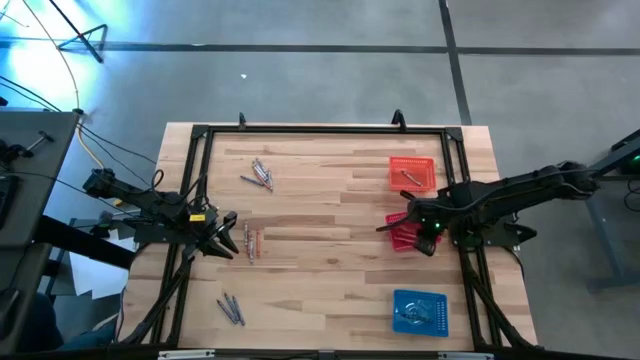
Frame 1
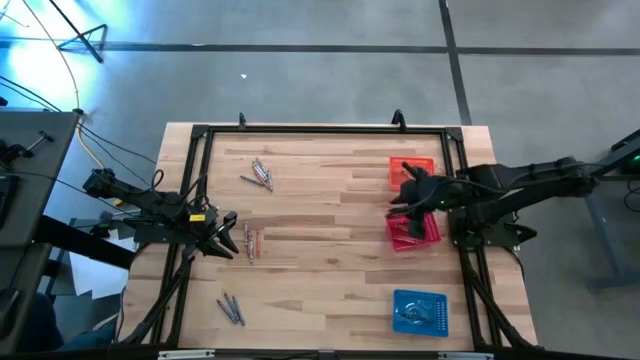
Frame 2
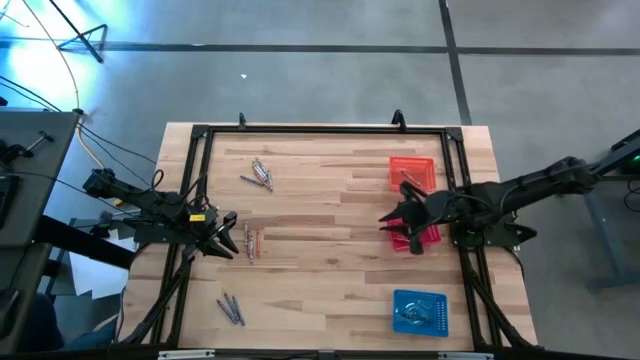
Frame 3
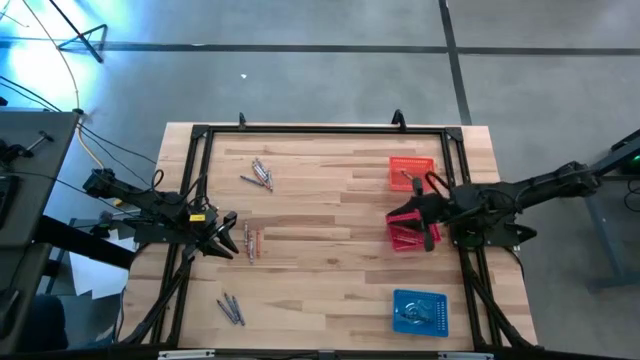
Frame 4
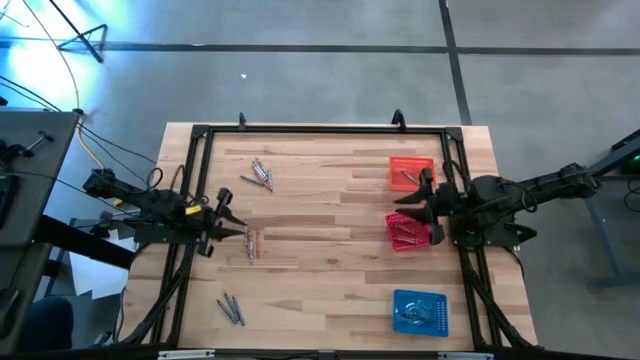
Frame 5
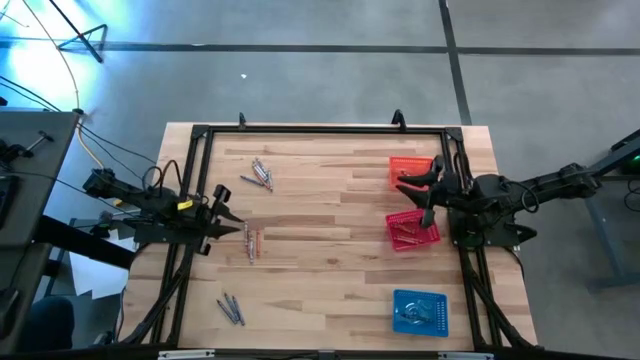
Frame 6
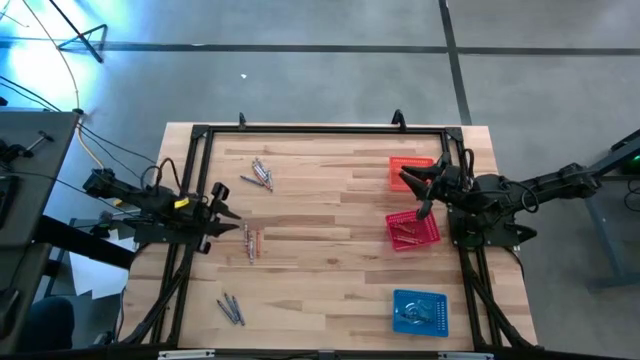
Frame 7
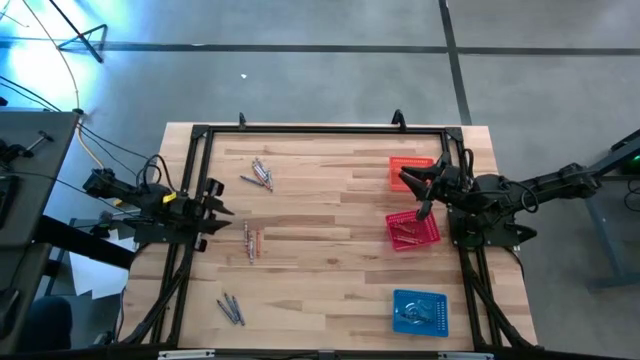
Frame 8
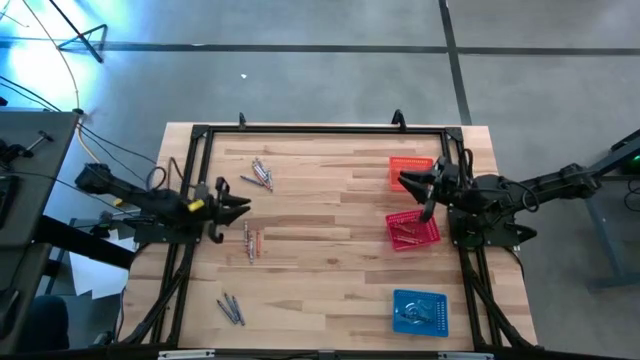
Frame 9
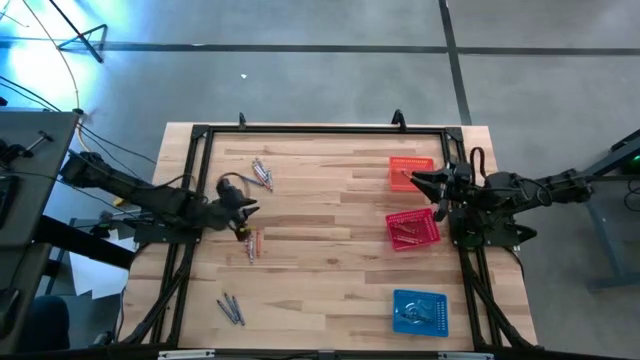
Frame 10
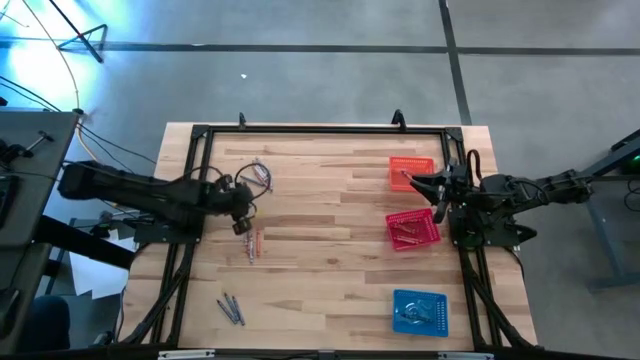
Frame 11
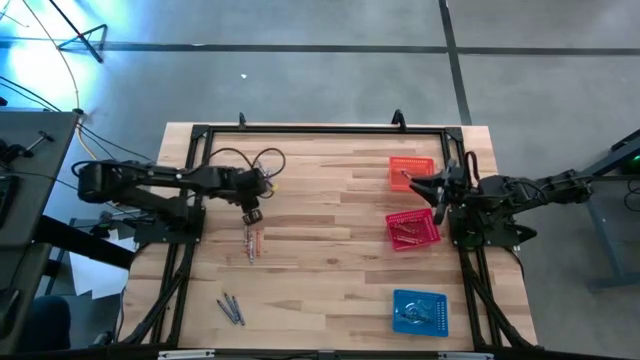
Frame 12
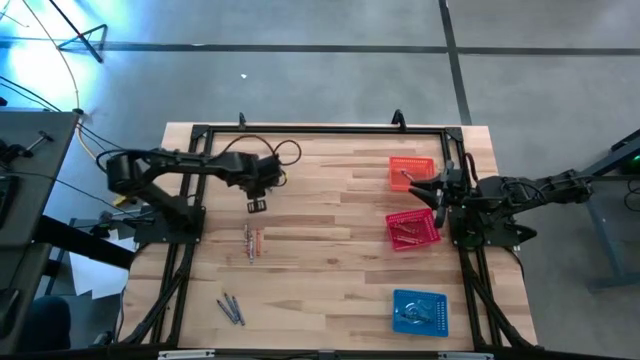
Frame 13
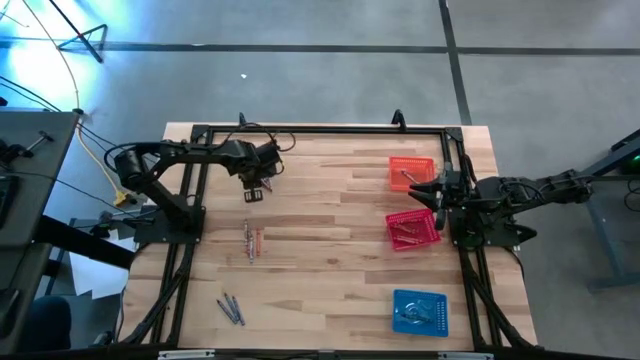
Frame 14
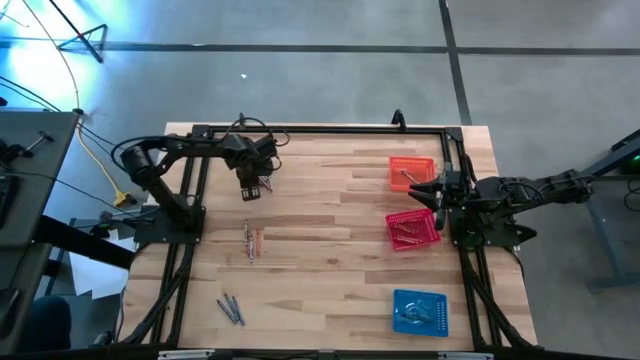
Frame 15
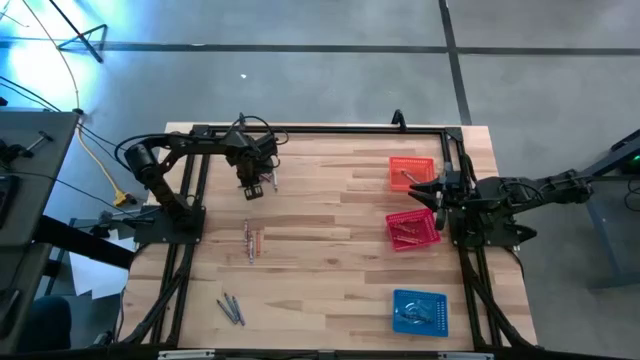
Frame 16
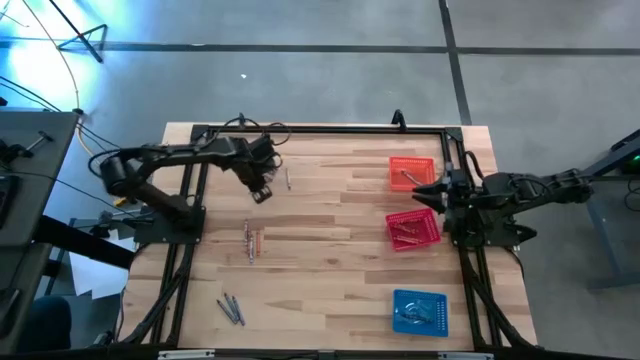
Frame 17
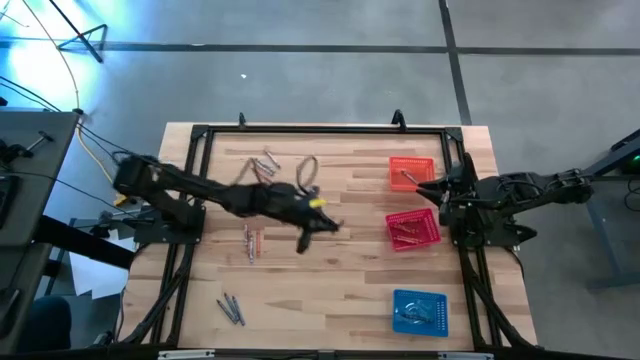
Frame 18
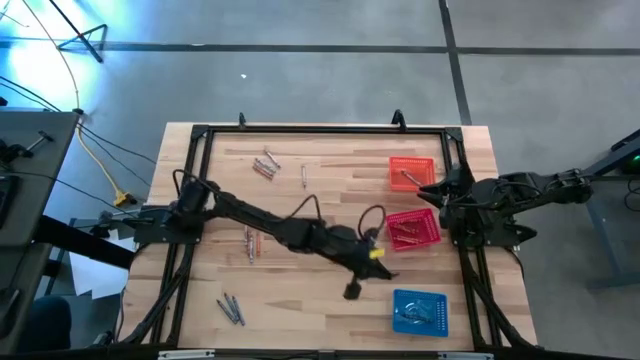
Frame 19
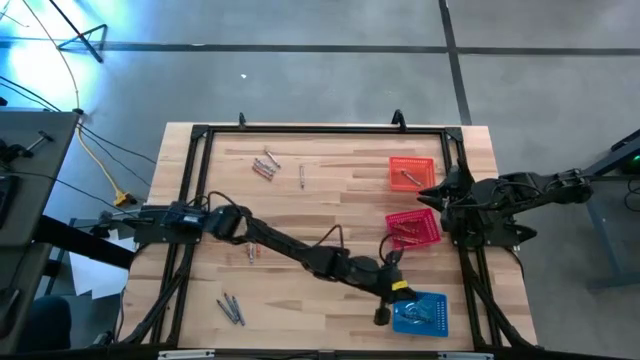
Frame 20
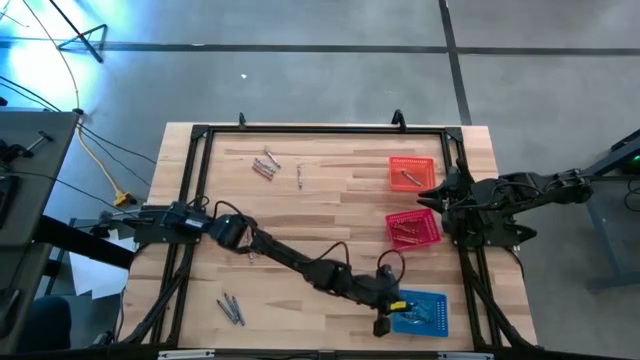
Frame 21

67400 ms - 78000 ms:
Task: Sort crayons
Put the blue crayon into the blue bin

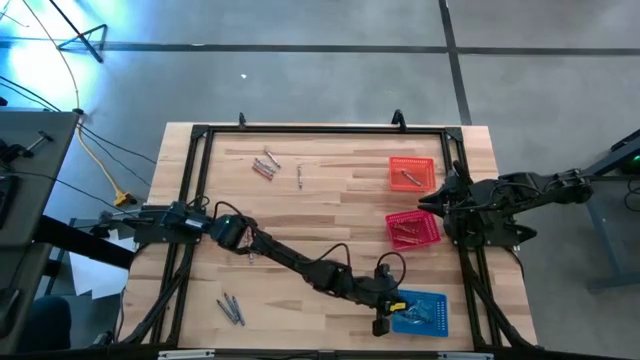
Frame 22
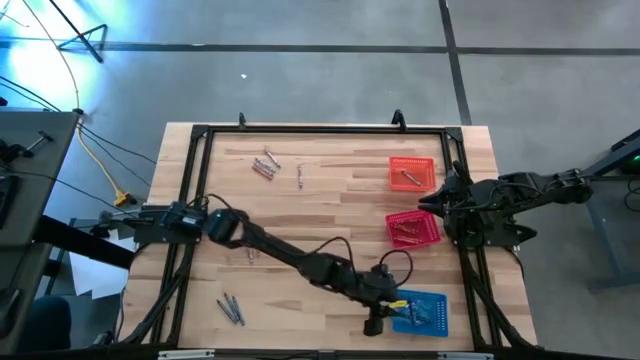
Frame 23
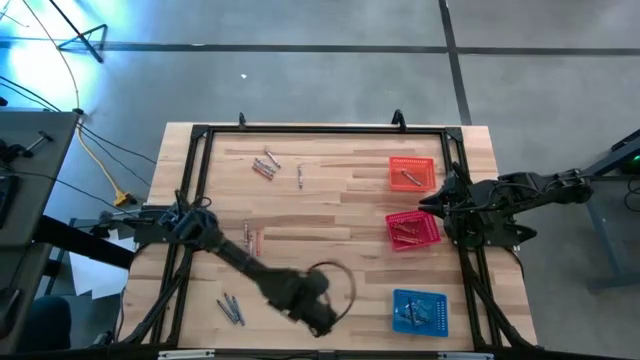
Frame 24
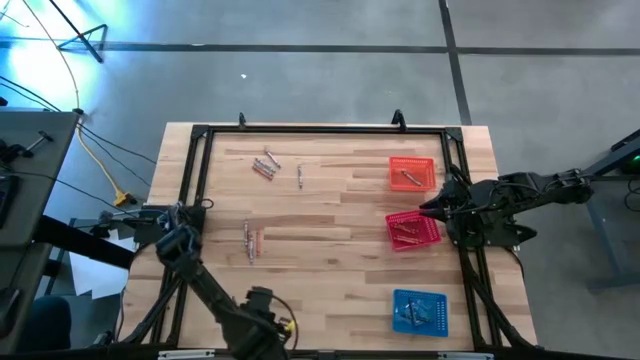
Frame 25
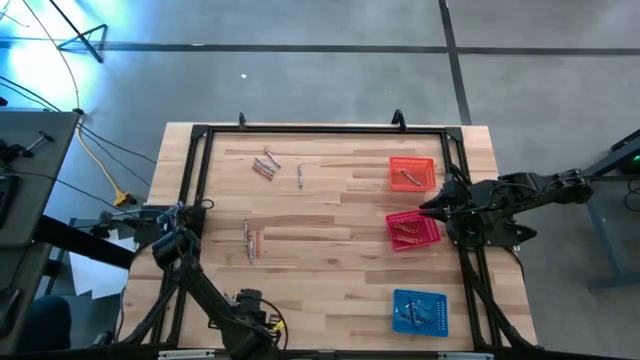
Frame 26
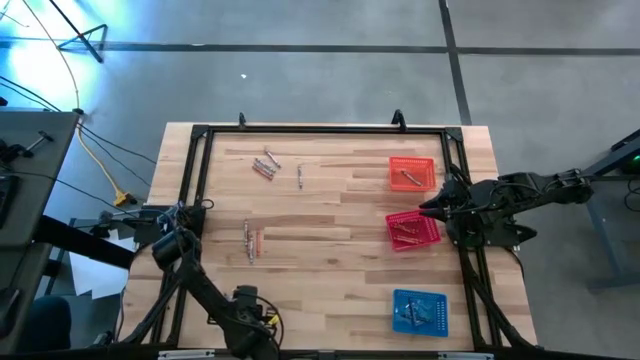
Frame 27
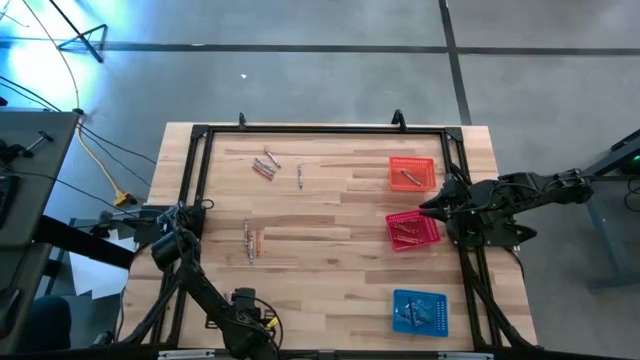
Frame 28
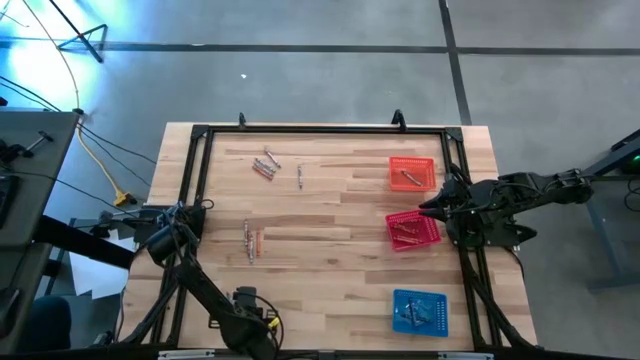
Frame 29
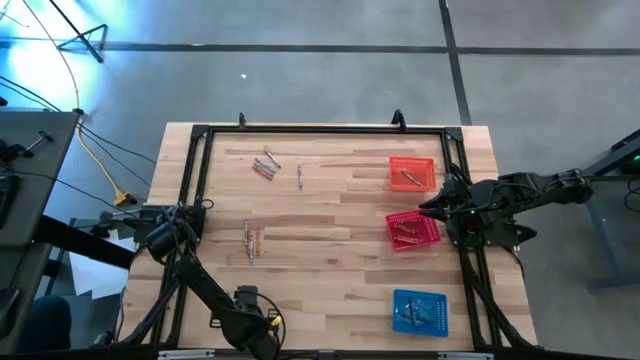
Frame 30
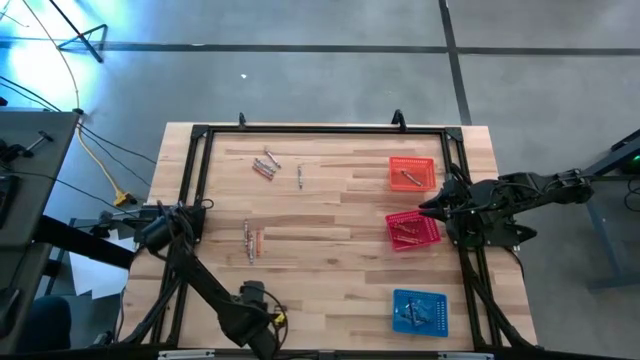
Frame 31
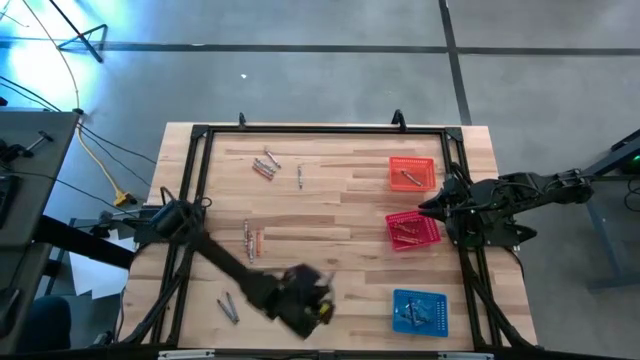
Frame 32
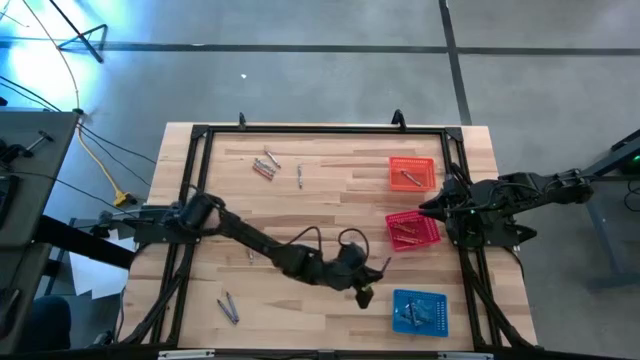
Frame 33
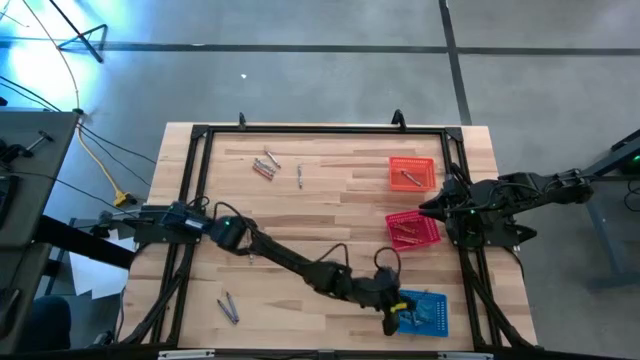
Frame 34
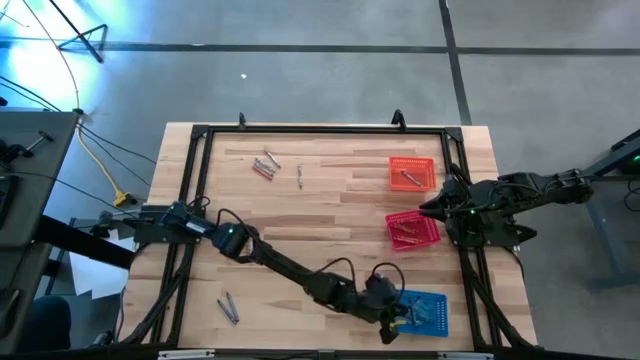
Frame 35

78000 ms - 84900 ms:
Put the blue crayon into the blue bin

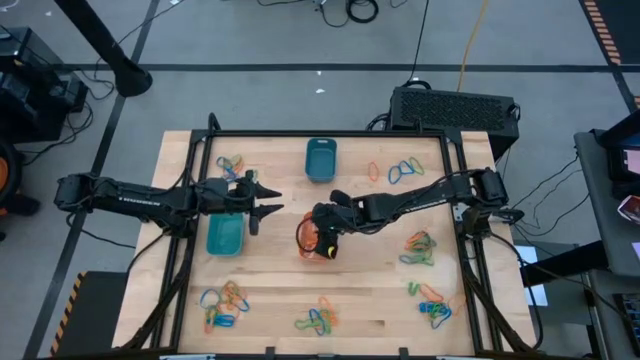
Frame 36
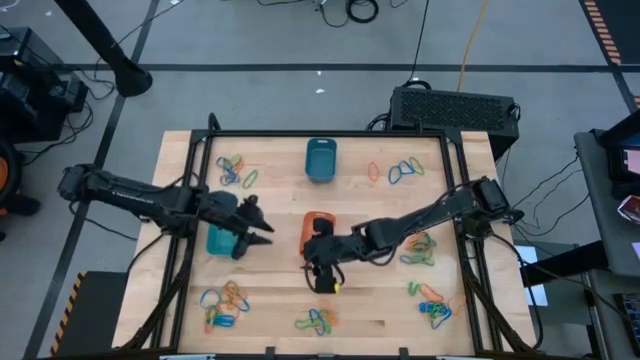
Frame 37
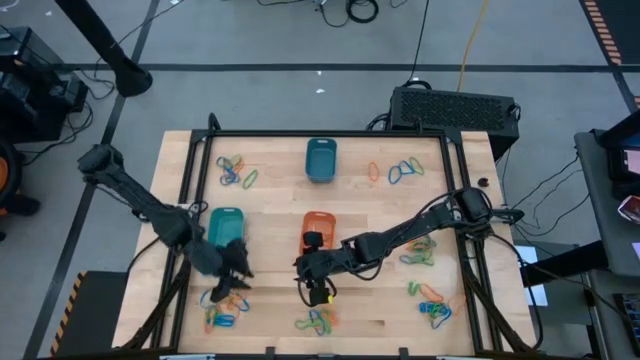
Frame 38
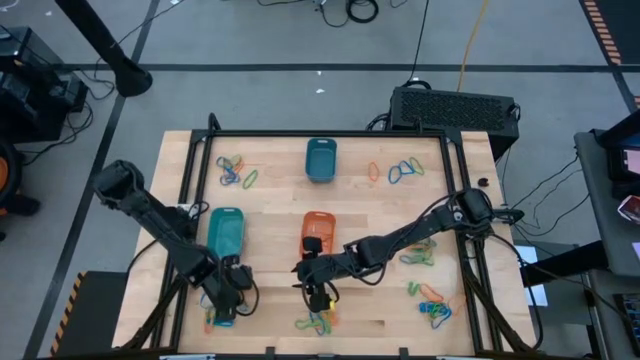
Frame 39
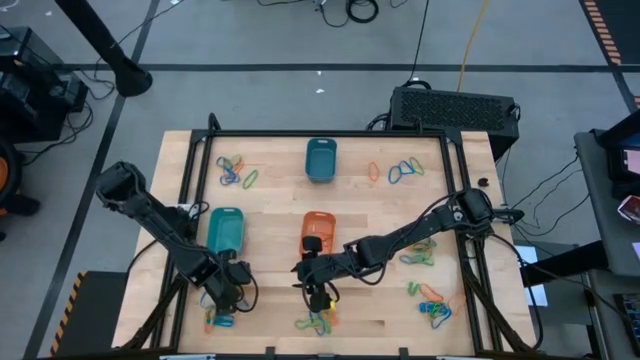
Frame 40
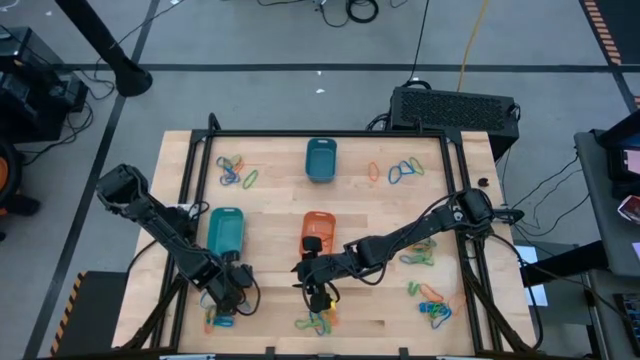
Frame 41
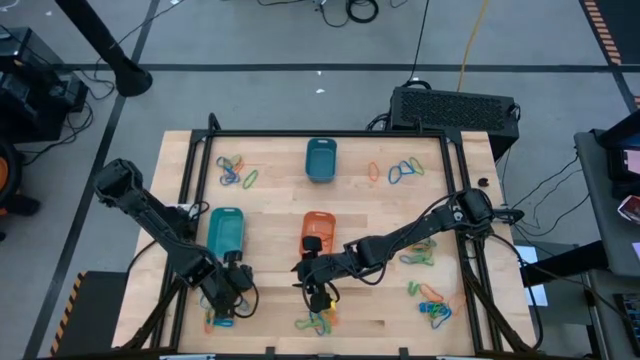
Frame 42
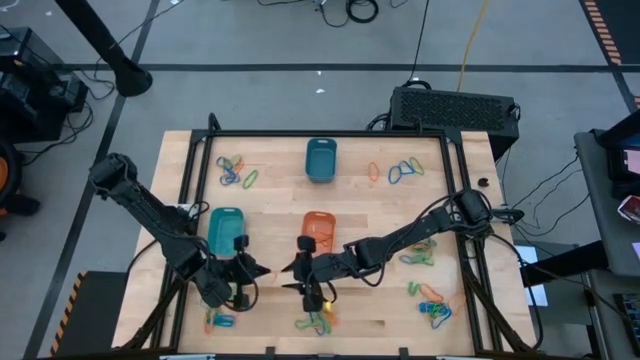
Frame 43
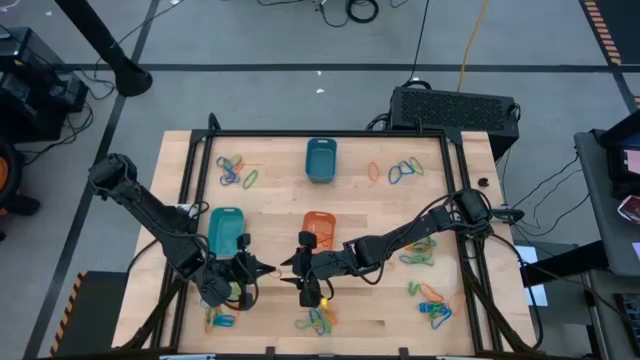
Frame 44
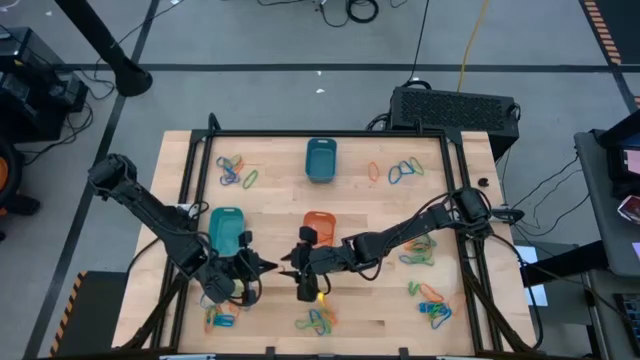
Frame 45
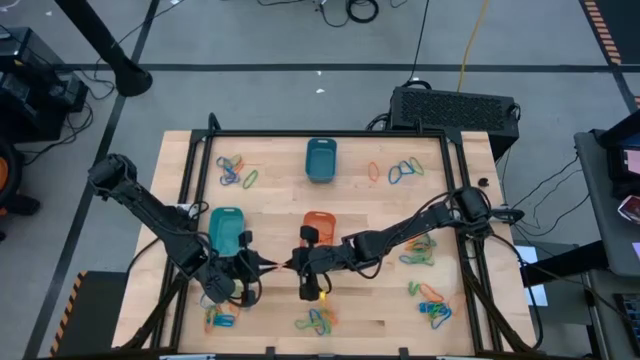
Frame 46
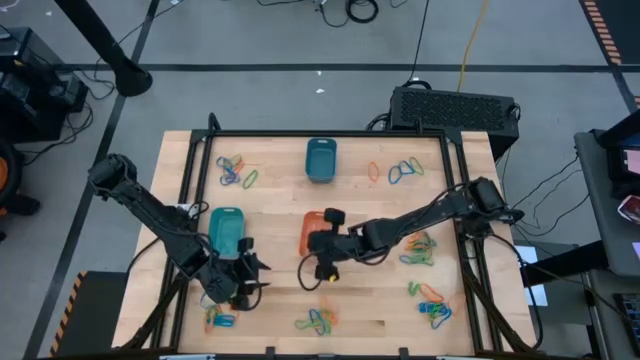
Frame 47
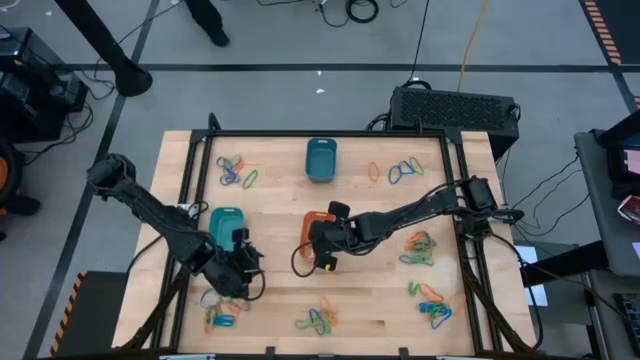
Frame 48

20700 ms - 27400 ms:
Task: Sort rubber bands into baskets
Put the orange rubber band into the orange bin
